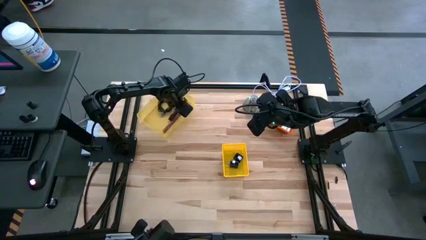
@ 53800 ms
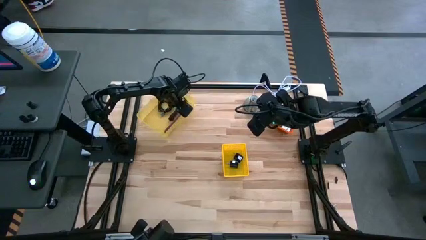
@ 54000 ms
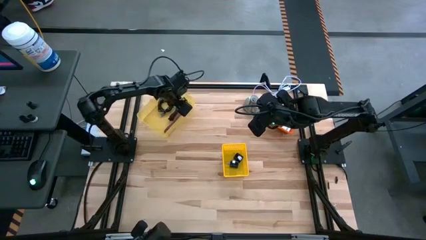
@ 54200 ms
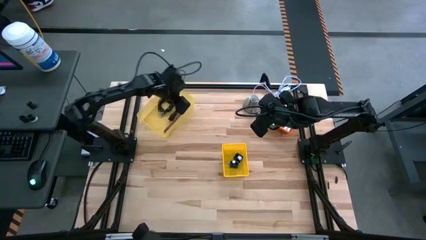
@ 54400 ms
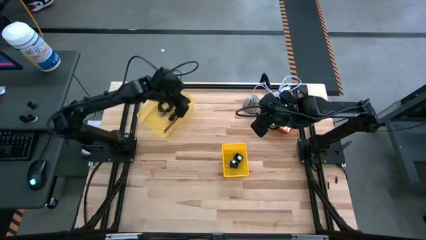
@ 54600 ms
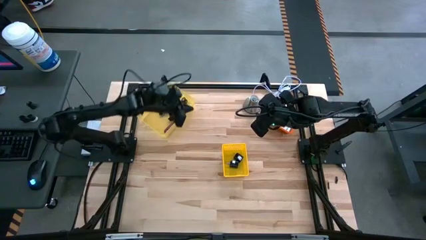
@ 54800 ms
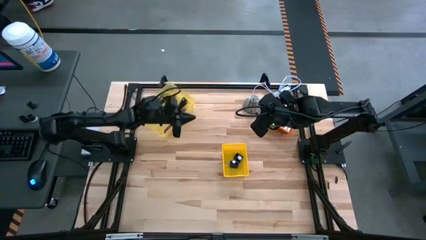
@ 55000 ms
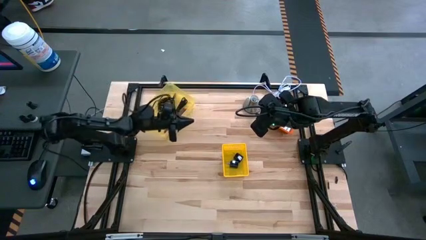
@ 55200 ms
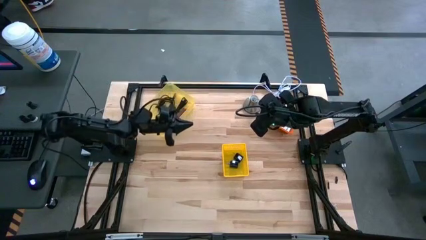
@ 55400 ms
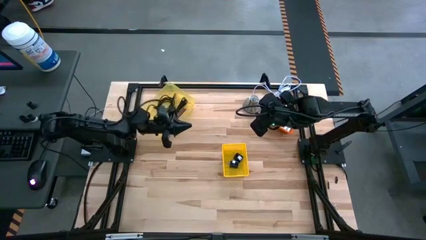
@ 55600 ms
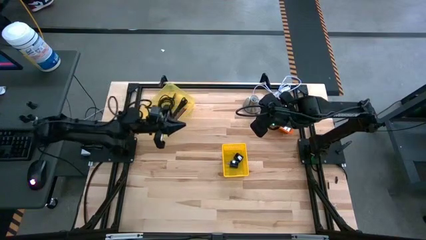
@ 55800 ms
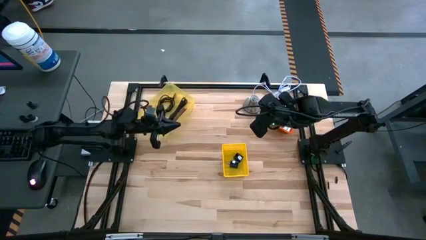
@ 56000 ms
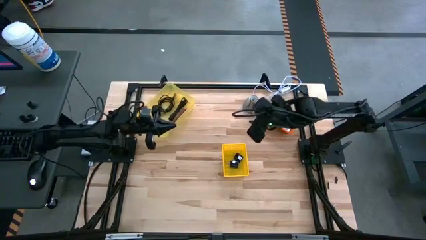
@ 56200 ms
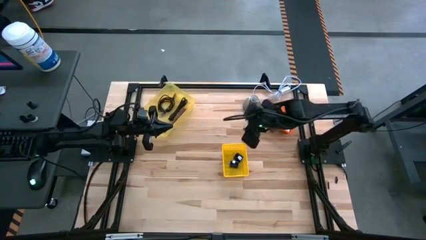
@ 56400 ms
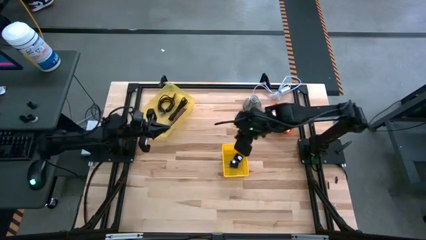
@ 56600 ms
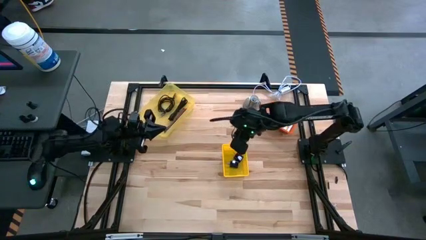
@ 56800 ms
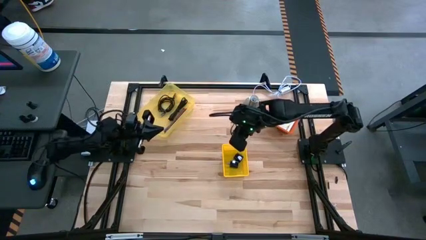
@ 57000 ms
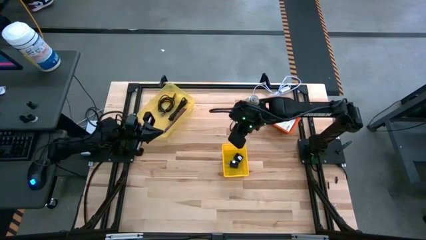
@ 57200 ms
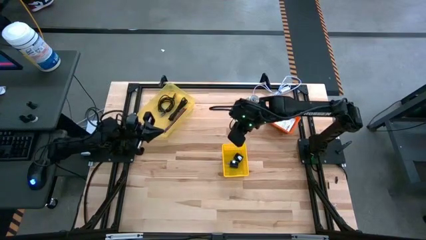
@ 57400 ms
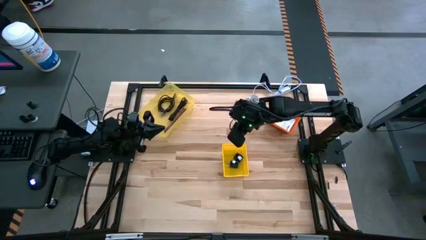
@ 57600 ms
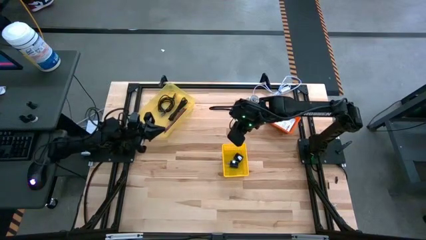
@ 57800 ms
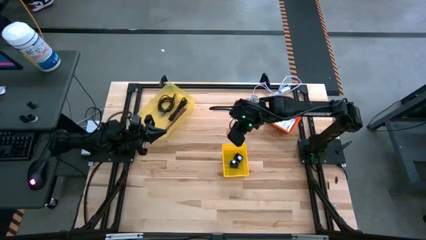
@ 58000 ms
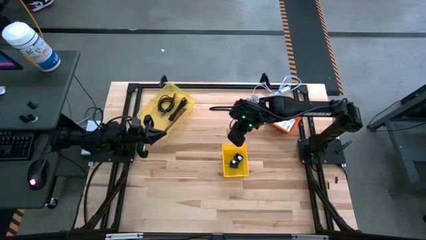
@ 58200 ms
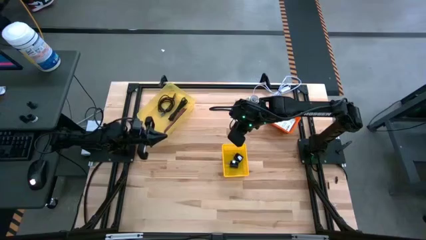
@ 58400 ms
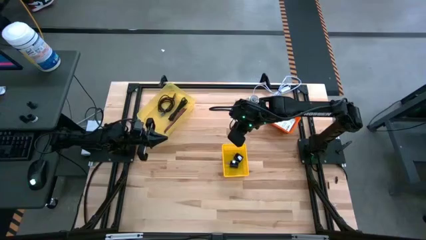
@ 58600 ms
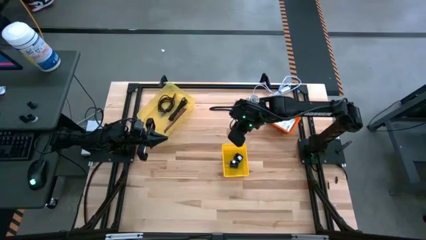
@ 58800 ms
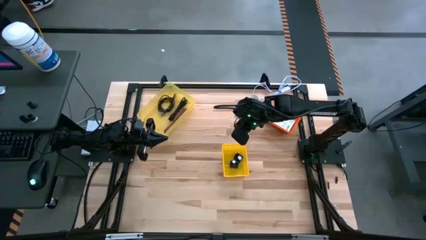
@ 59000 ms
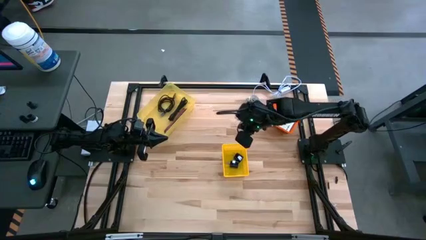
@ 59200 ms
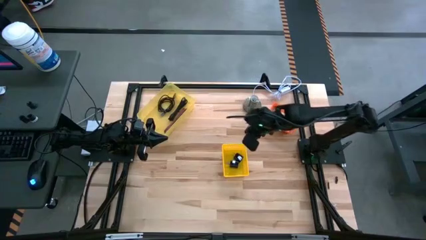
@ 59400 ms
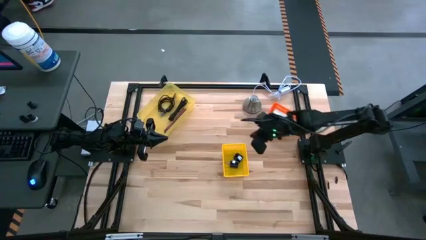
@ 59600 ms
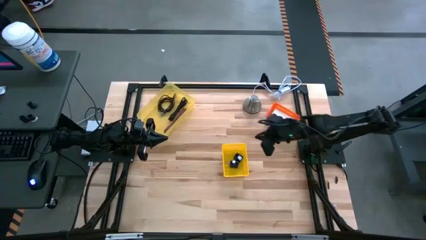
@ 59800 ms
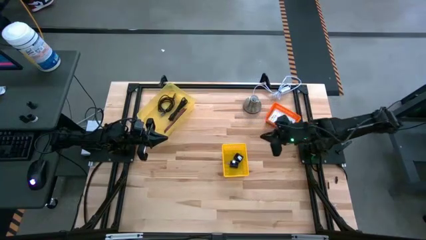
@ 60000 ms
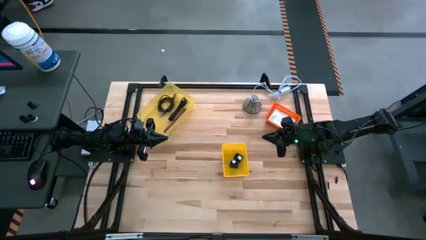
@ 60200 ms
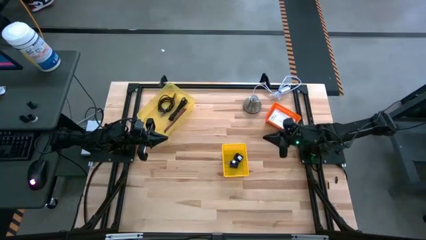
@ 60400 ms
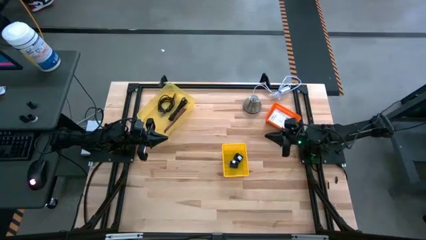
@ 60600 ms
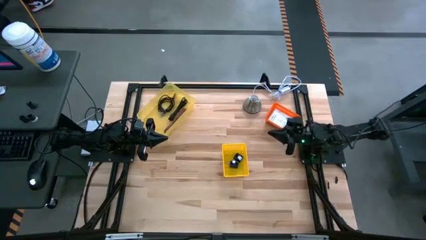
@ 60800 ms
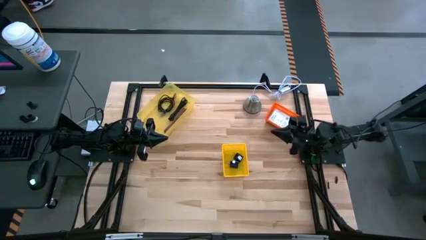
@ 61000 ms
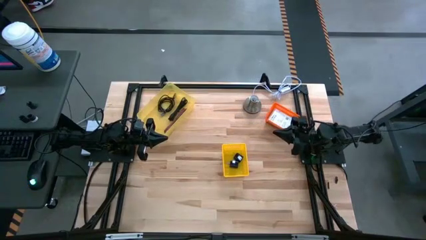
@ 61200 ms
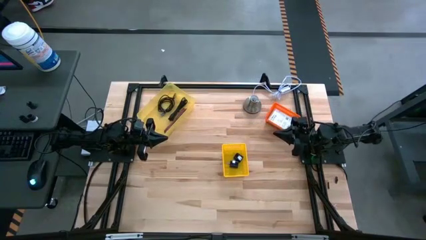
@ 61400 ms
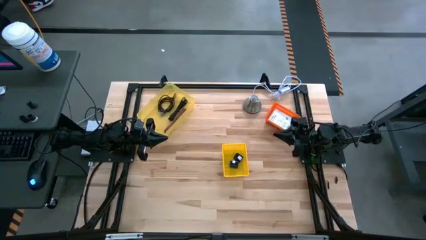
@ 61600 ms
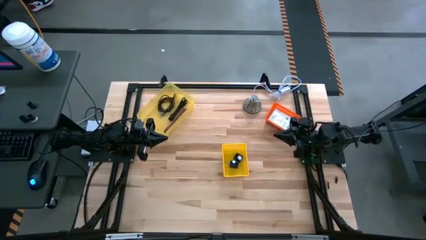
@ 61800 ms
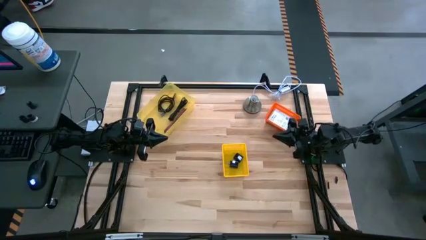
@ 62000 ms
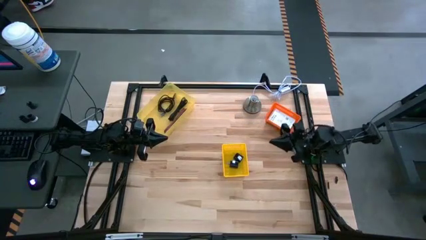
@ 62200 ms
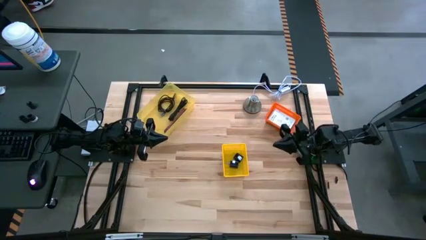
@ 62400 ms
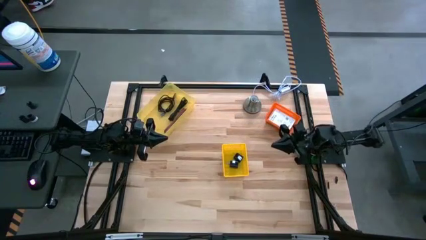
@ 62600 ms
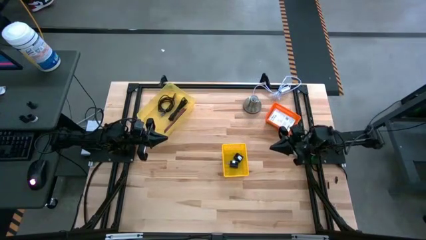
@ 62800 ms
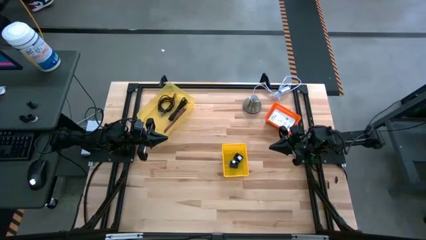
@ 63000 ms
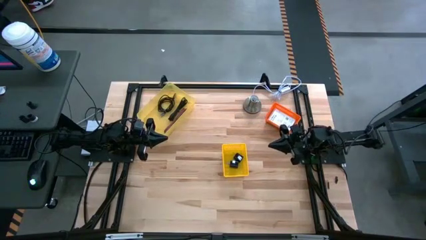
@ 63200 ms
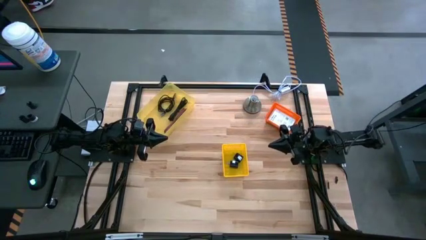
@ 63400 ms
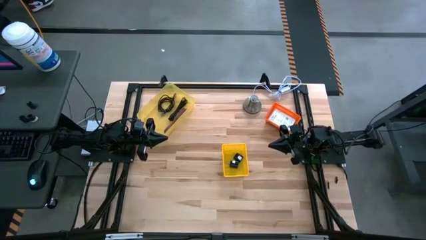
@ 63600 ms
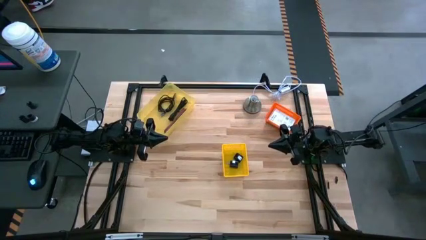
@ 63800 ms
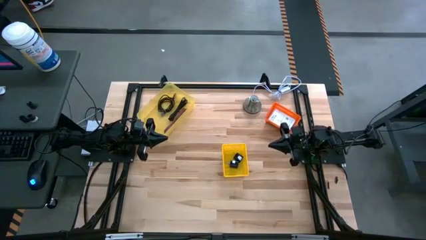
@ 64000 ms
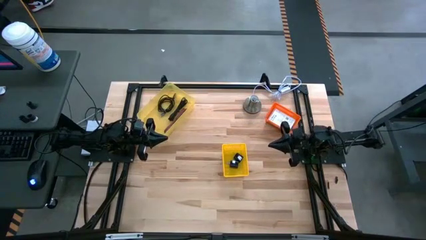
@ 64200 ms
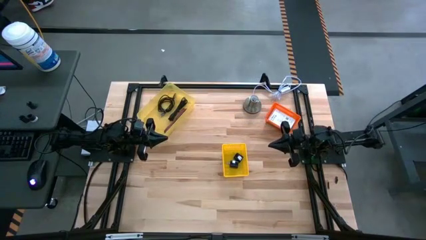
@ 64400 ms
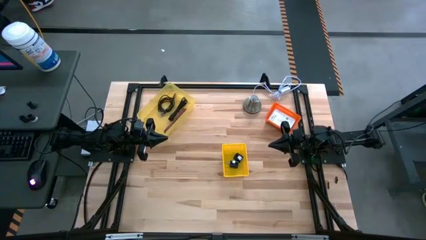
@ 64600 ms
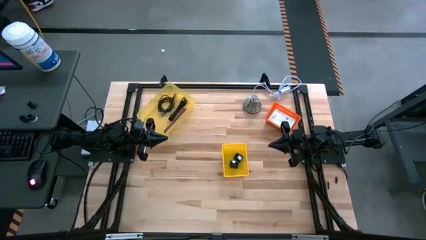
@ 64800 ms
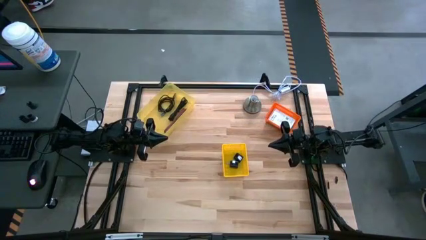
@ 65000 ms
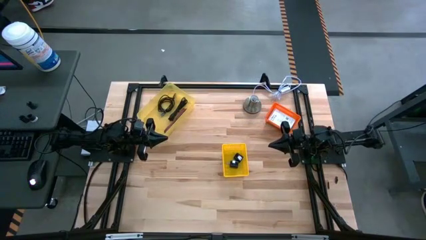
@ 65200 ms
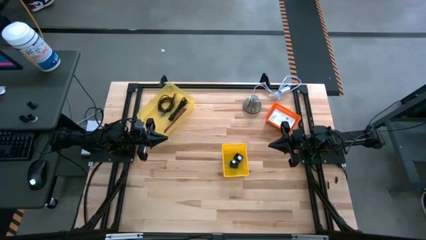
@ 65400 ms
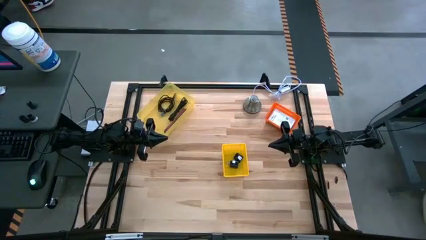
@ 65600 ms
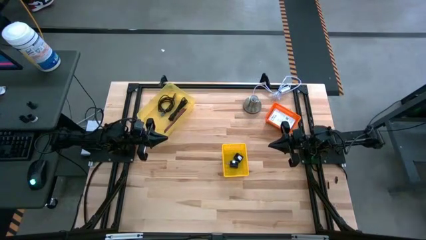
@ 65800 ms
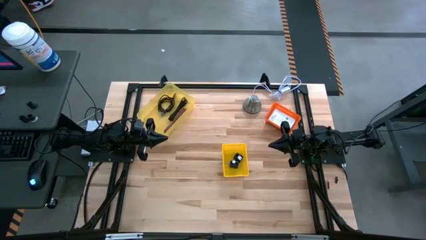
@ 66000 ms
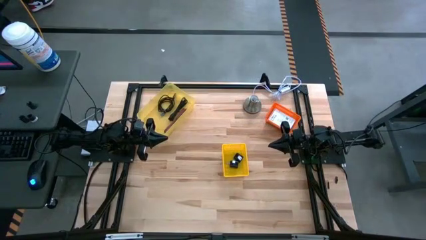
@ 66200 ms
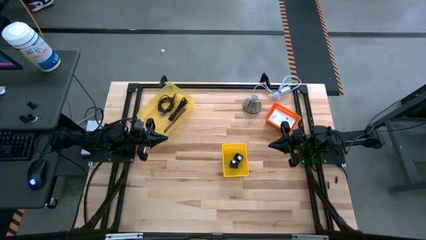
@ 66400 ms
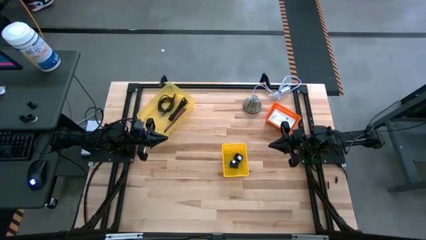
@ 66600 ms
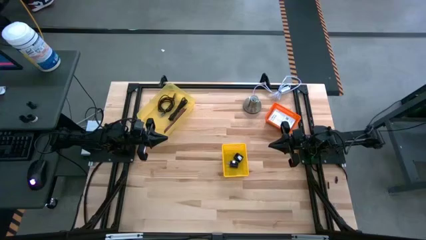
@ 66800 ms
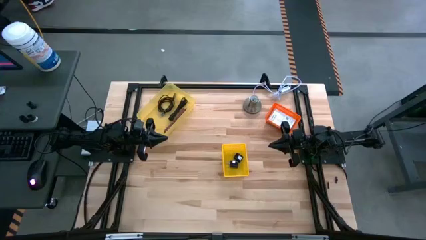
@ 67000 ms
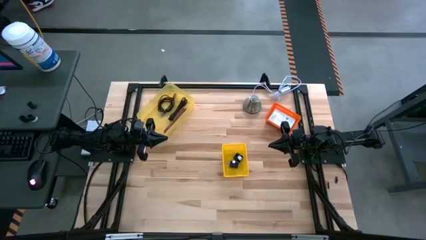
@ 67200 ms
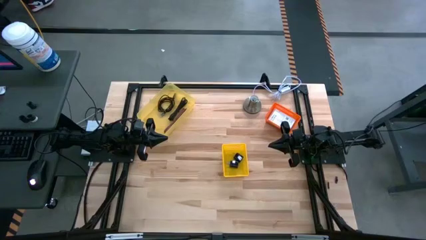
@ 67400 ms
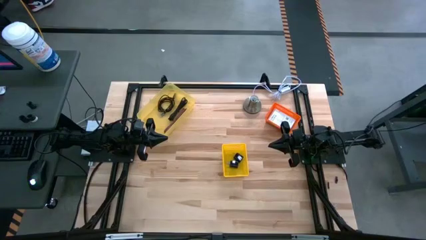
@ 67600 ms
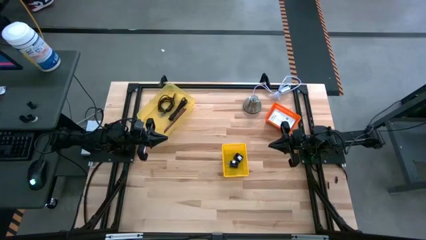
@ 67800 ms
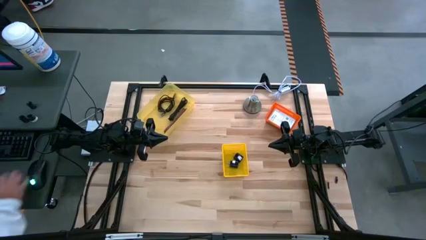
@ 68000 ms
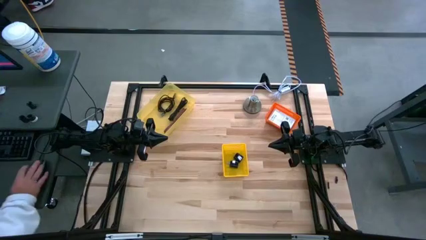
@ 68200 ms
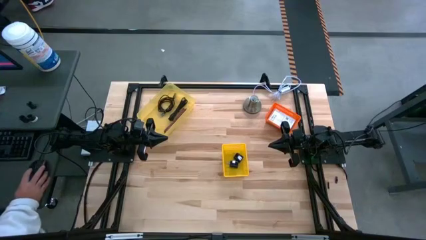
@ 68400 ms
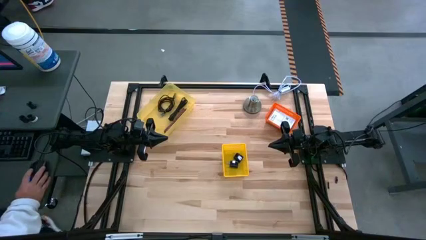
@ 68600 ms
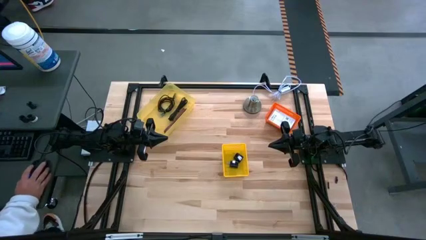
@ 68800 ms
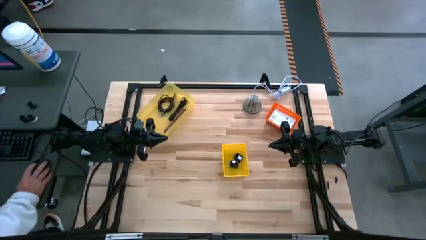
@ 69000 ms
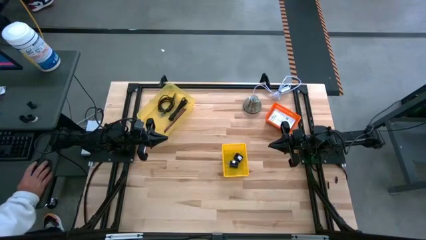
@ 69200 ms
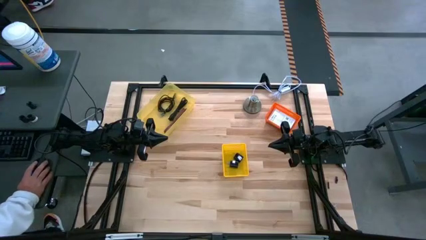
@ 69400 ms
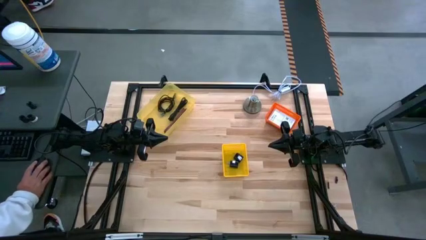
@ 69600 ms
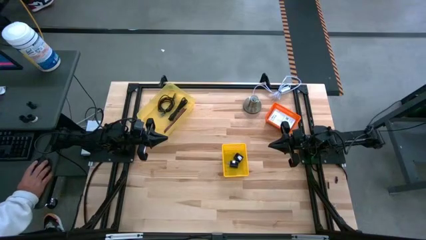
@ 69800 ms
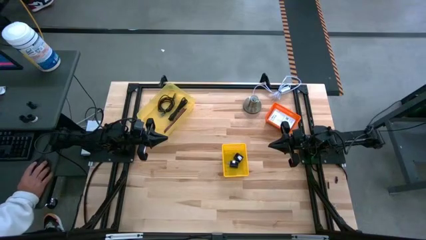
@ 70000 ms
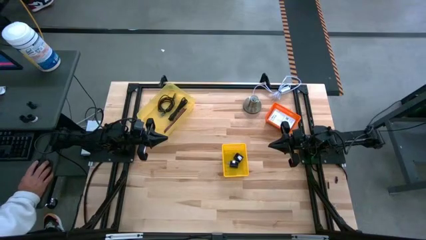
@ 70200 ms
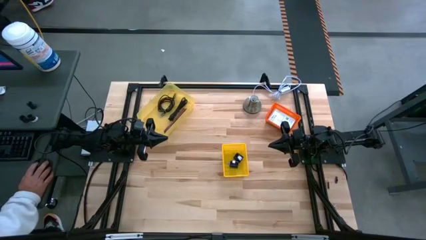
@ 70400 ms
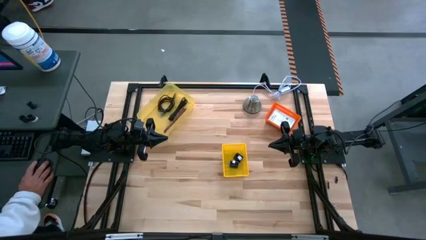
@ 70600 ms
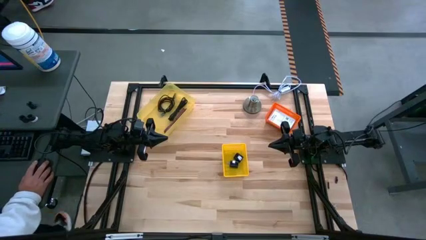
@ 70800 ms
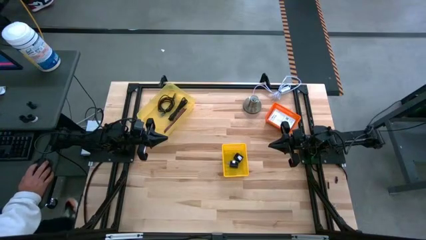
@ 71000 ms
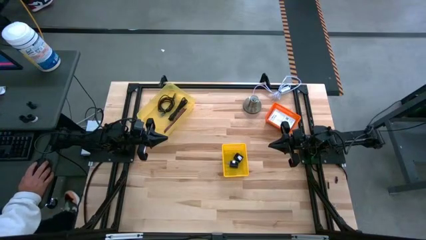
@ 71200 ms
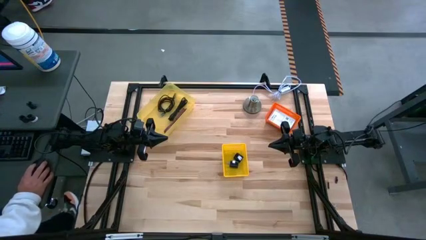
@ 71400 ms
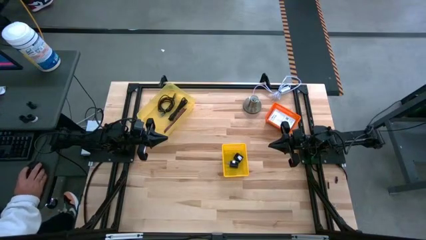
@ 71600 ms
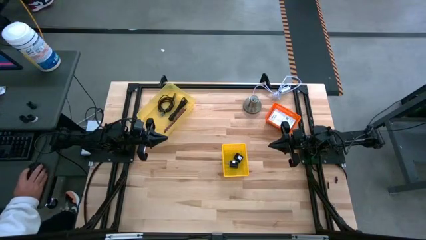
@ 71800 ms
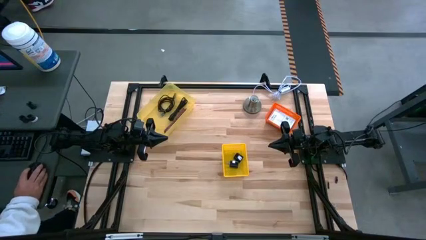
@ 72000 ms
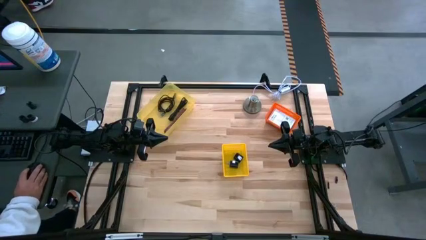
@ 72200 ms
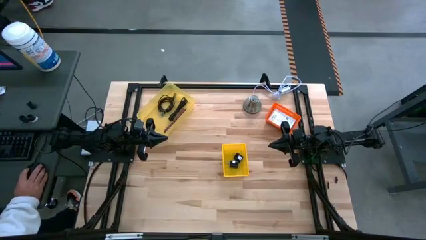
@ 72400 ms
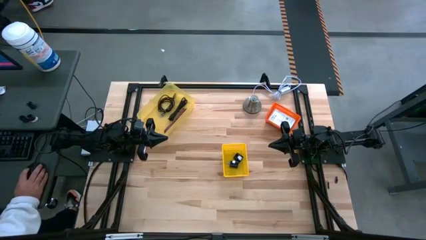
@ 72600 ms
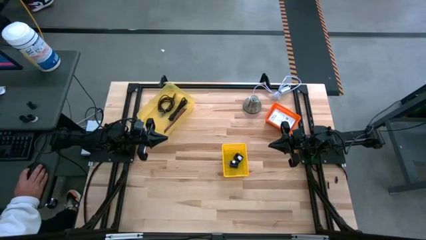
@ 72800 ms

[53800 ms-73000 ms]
Task: Pick and place items into bin
Return to Home Position
